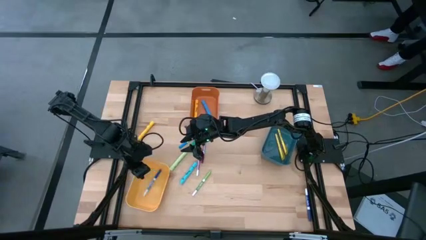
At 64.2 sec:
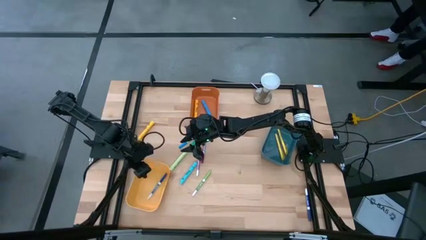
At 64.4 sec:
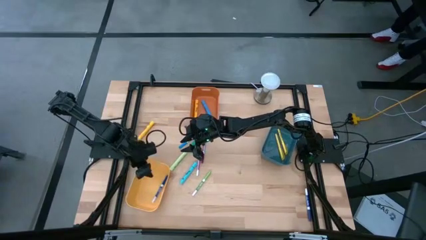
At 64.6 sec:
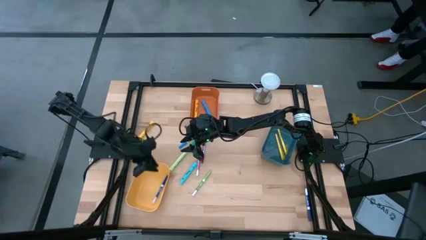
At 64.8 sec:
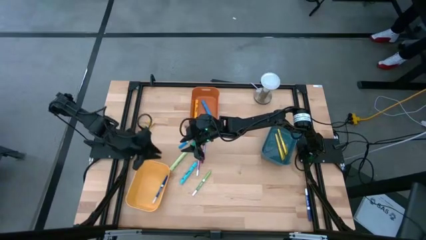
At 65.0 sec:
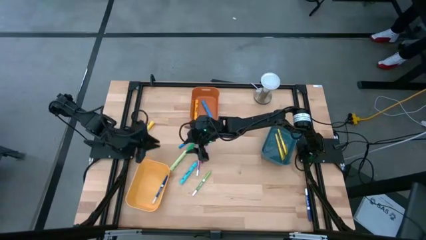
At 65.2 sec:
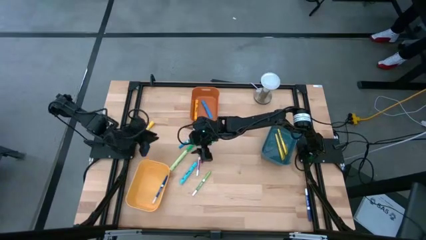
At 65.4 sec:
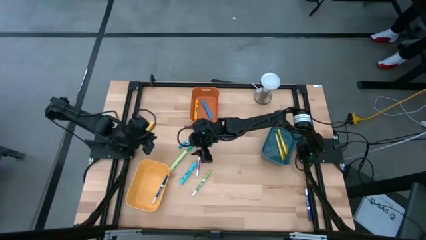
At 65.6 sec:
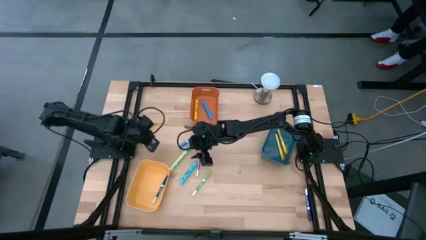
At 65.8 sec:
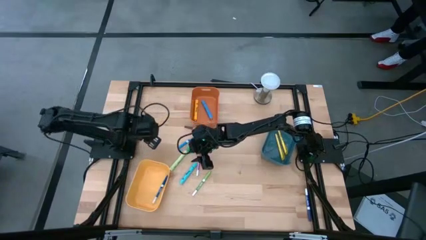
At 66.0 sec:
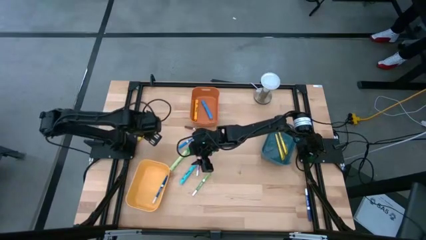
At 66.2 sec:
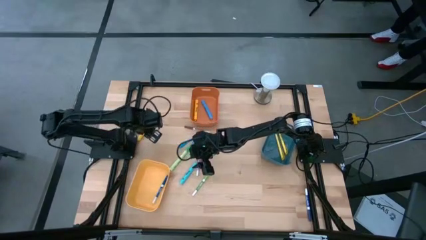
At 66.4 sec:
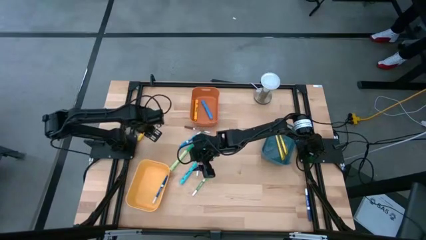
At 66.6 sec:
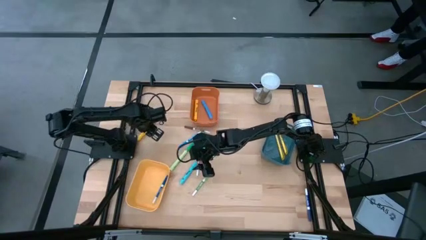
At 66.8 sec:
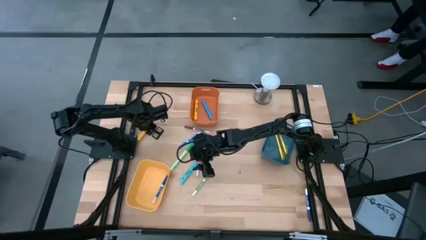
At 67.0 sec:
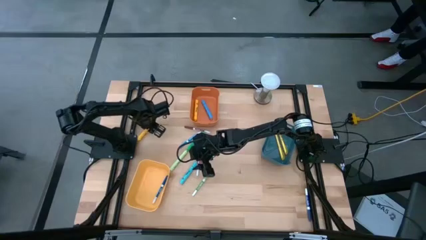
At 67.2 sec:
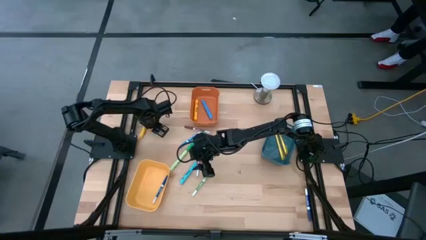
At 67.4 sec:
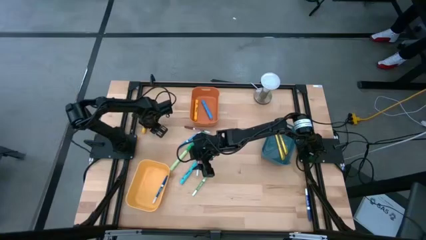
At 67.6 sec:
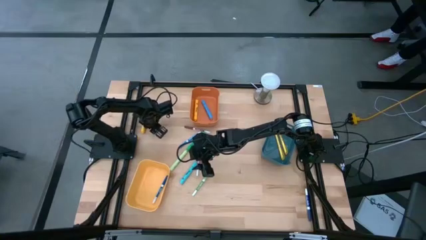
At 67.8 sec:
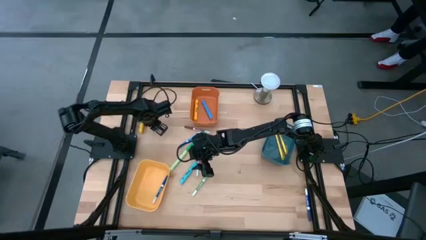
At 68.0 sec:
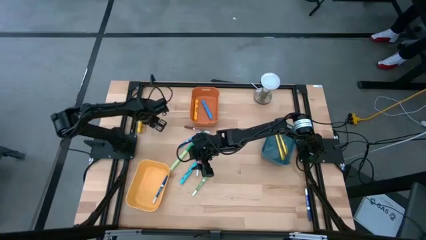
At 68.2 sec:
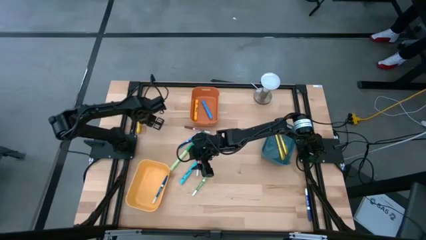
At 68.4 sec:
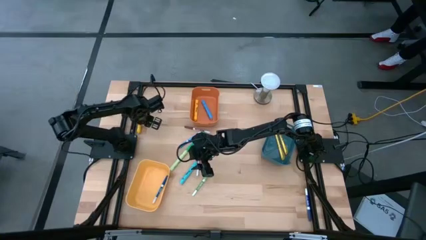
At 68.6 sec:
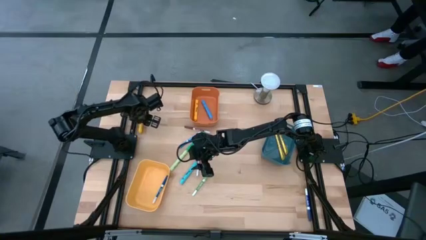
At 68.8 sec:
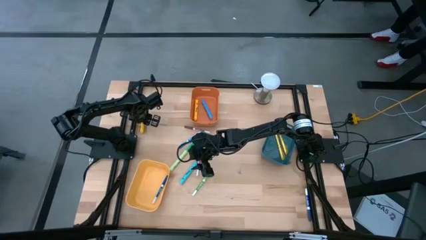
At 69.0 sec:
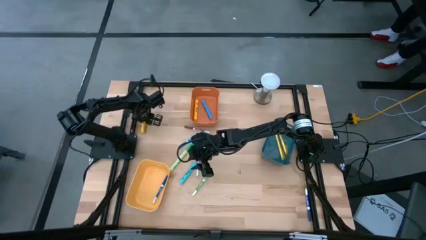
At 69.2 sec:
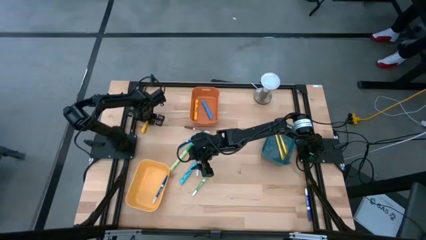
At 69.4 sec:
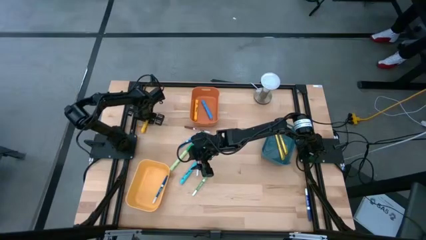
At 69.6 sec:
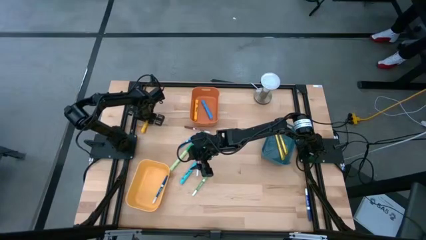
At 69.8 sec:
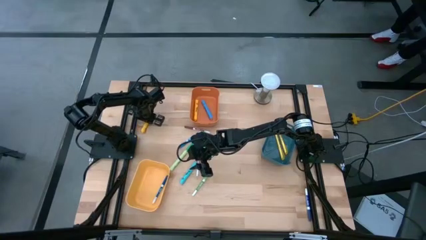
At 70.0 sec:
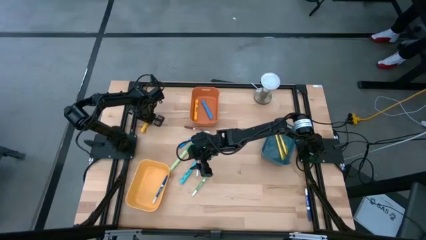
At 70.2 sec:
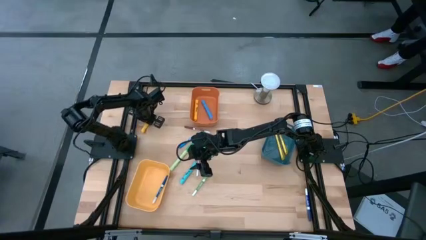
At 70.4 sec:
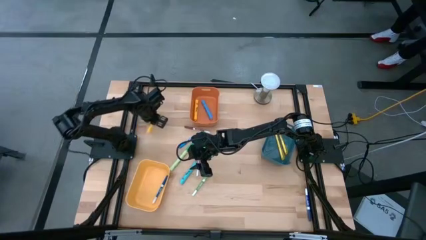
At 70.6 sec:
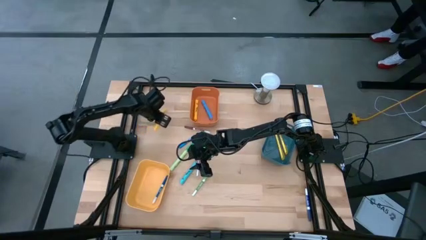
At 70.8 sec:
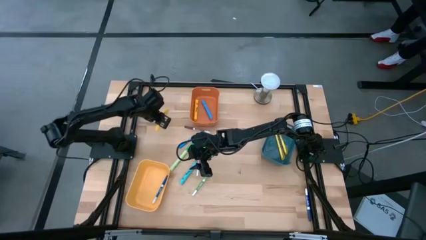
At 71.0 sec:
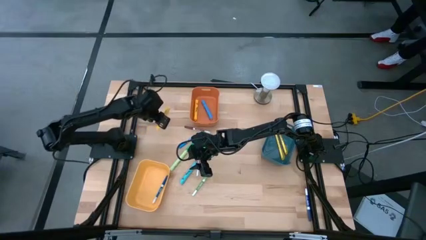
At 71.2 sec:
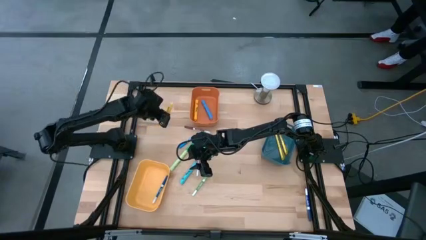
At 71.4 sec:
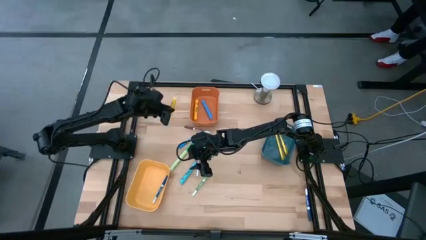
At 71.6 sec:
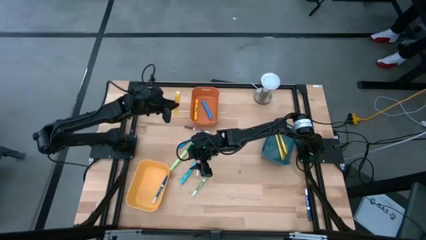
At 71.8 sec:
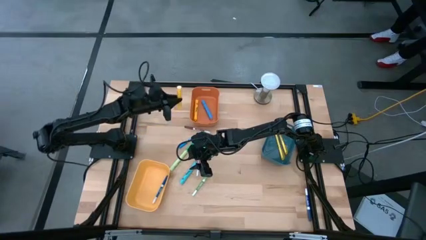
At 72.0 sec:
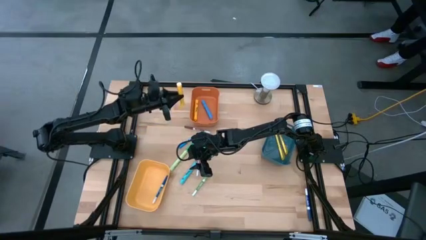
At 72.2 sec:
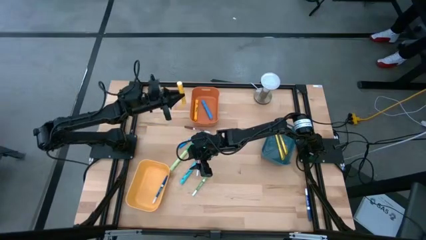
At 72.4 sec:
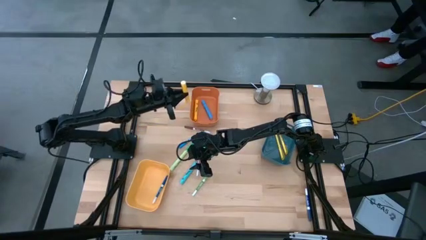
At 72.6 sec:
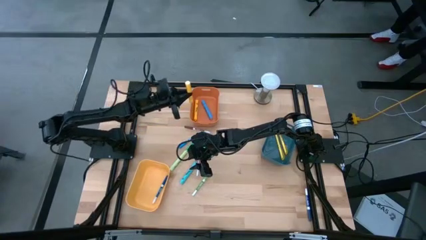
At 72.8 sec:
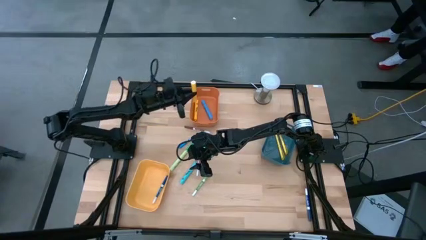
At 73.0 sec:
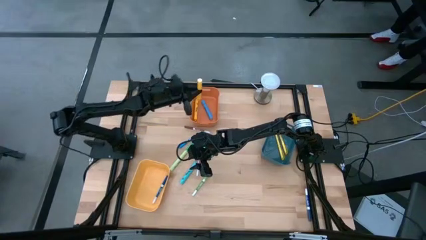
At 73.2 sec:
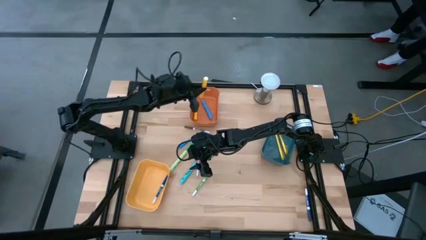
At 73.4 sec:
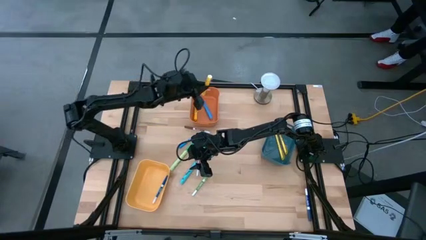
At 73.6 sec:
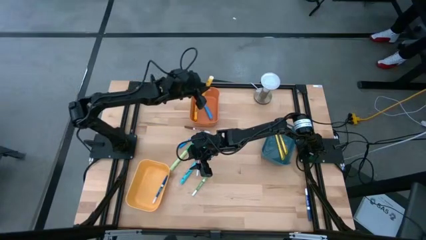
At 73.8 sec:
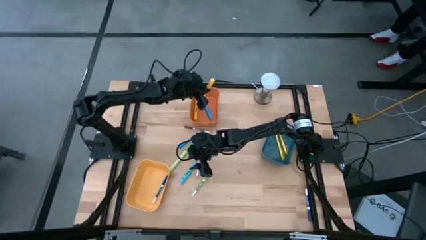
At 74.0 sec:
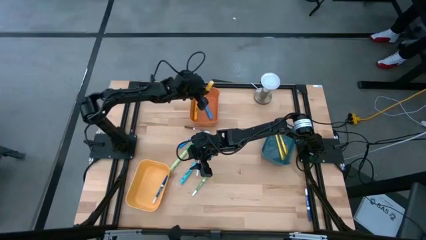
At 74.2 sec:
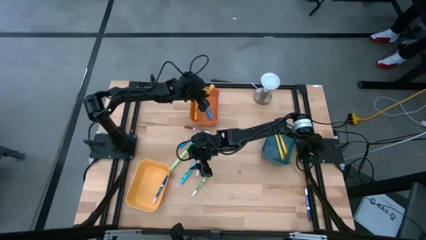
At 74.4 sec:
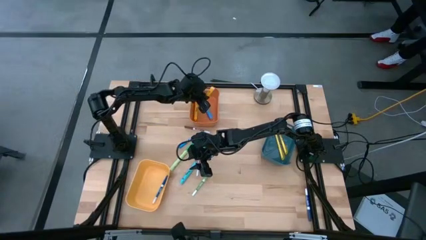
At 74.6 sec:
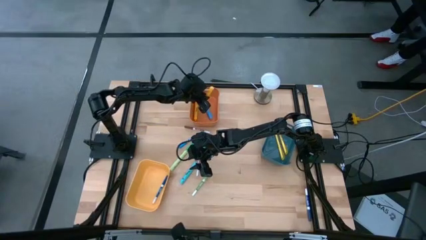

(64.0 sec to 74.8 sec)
Task: Pick & Place Markers
Put the yellow highlighter pen into the orange bin
